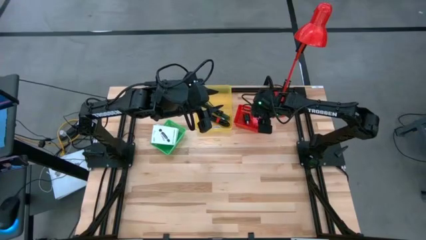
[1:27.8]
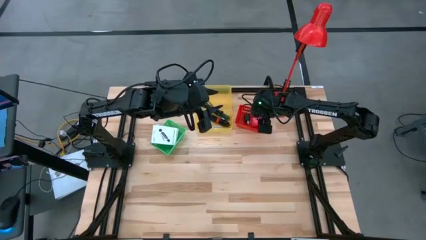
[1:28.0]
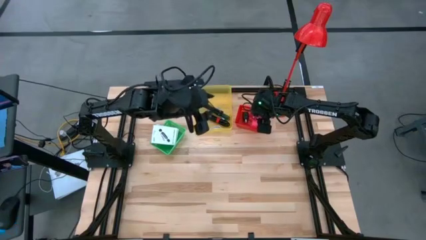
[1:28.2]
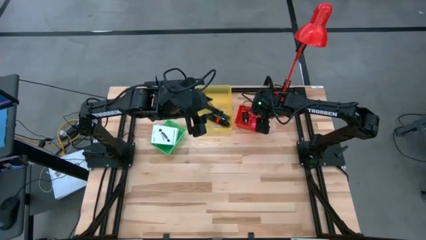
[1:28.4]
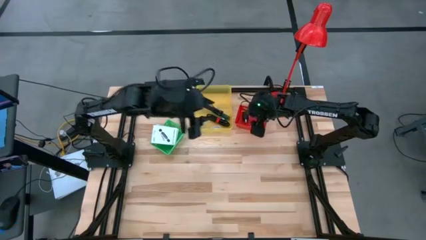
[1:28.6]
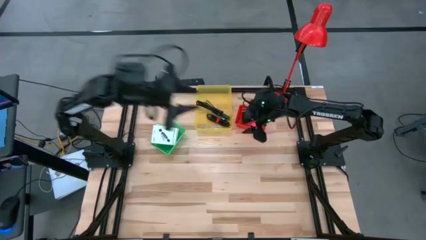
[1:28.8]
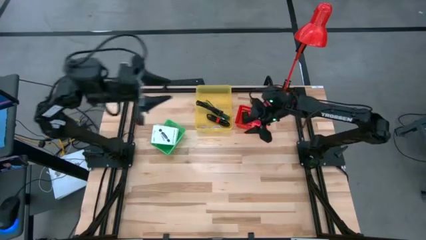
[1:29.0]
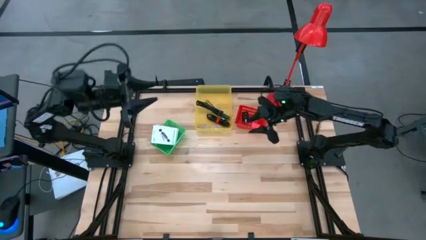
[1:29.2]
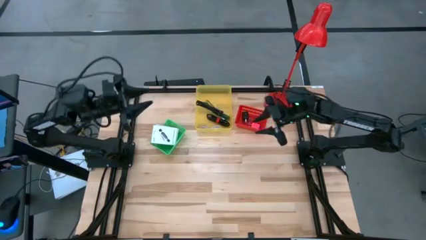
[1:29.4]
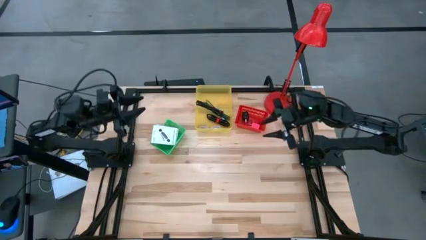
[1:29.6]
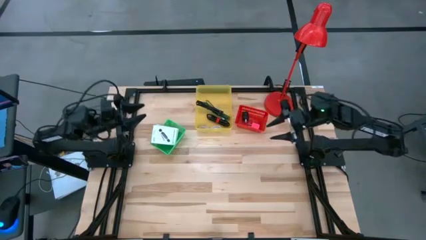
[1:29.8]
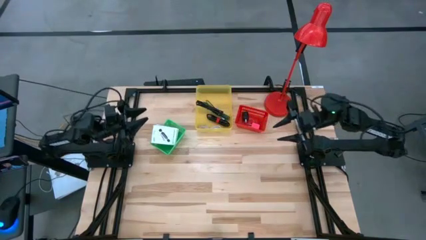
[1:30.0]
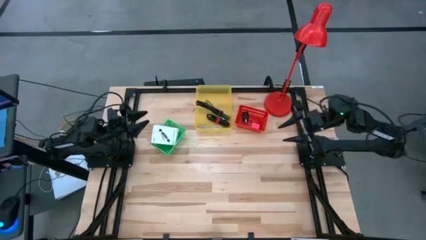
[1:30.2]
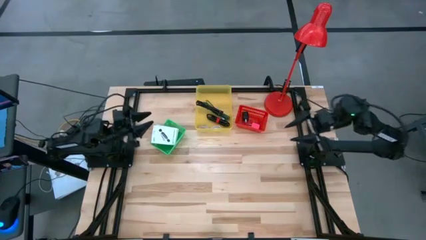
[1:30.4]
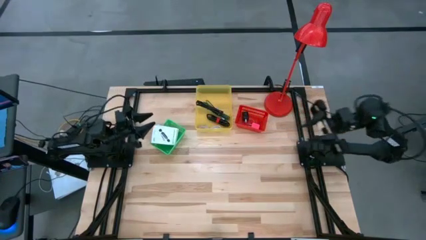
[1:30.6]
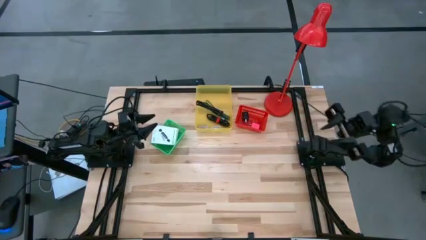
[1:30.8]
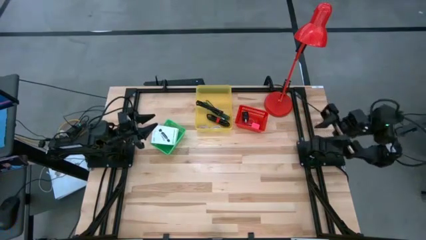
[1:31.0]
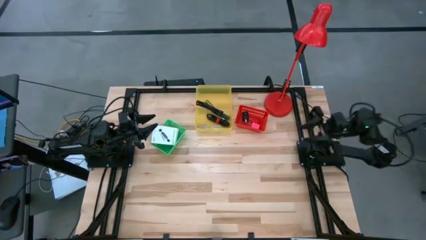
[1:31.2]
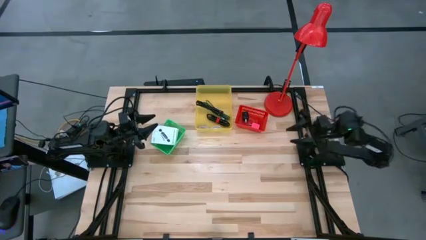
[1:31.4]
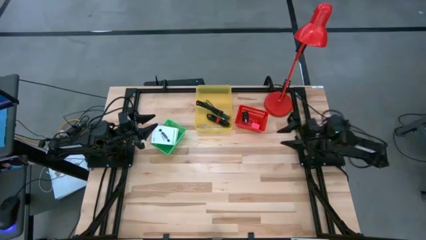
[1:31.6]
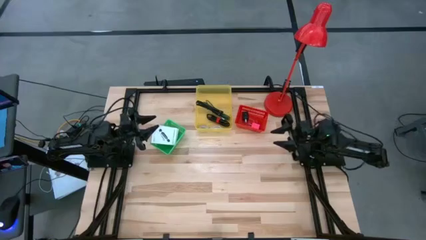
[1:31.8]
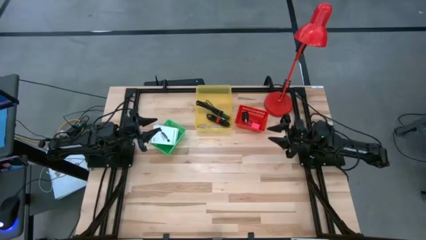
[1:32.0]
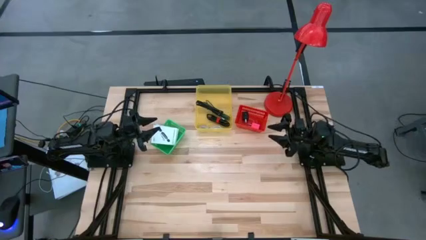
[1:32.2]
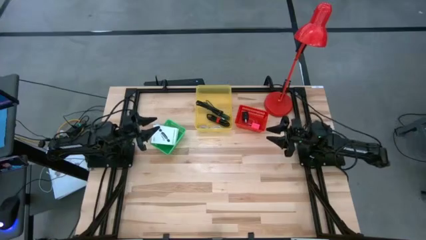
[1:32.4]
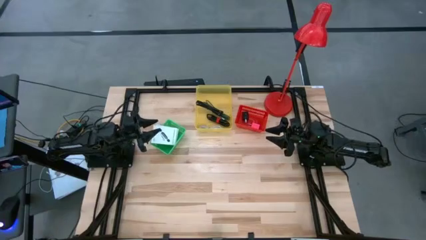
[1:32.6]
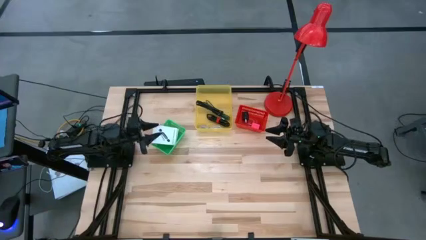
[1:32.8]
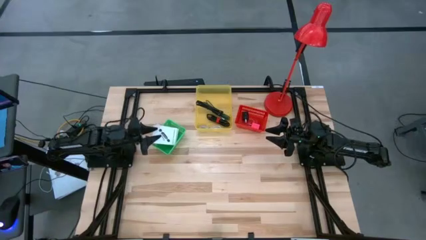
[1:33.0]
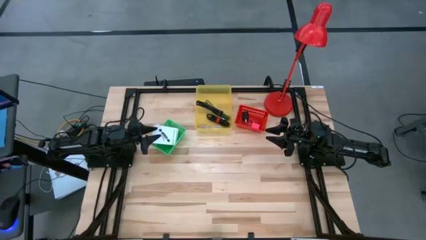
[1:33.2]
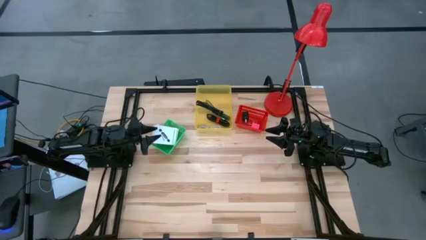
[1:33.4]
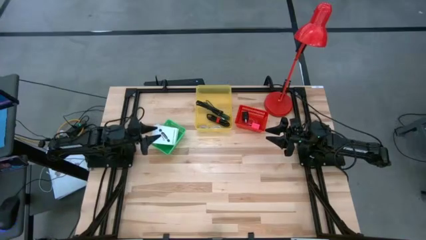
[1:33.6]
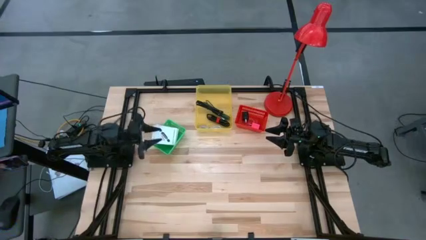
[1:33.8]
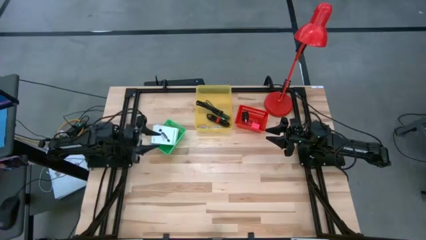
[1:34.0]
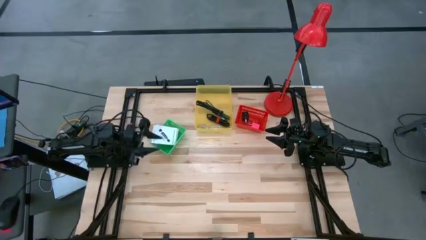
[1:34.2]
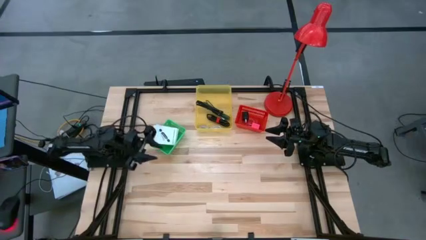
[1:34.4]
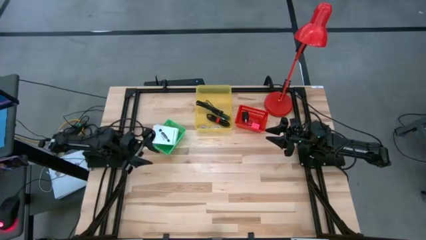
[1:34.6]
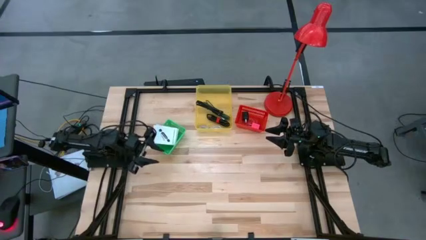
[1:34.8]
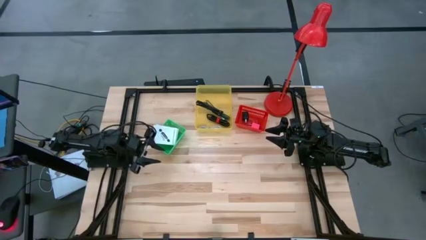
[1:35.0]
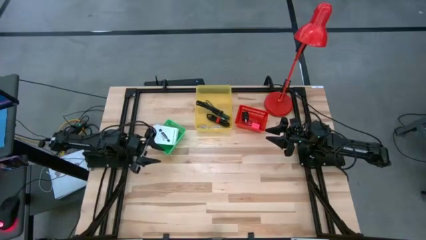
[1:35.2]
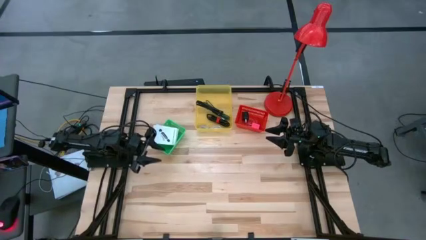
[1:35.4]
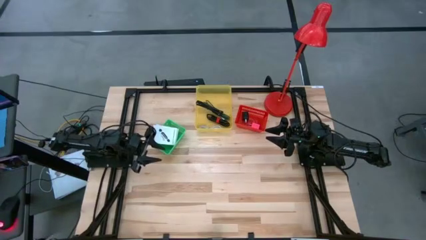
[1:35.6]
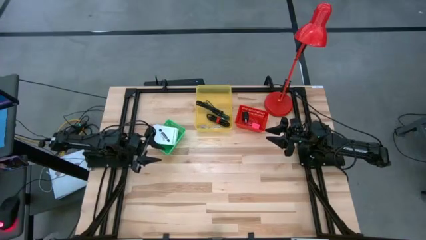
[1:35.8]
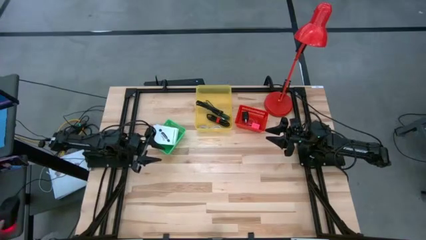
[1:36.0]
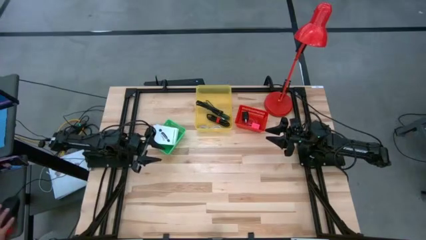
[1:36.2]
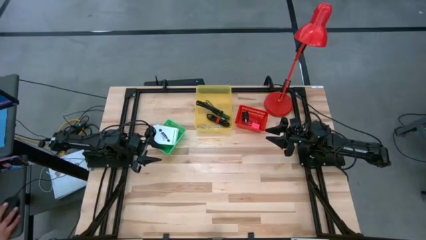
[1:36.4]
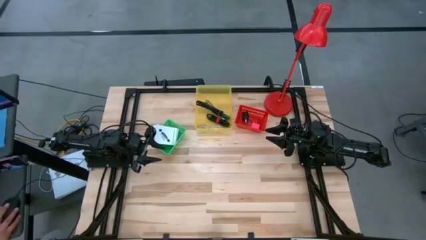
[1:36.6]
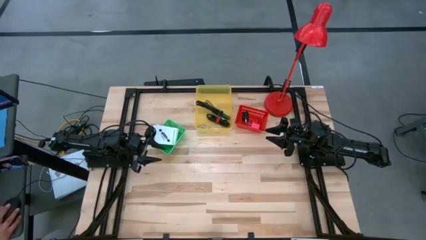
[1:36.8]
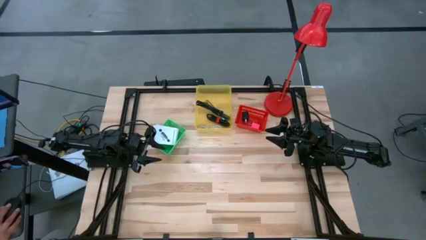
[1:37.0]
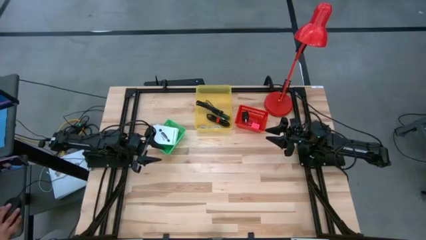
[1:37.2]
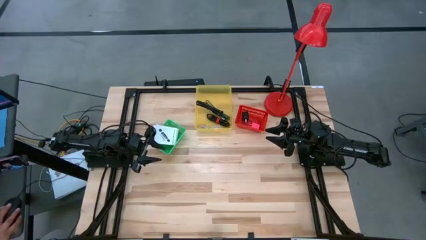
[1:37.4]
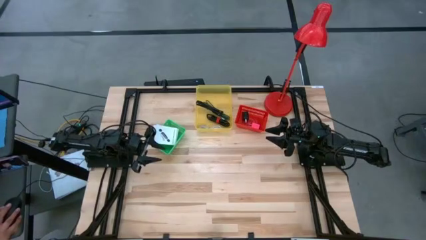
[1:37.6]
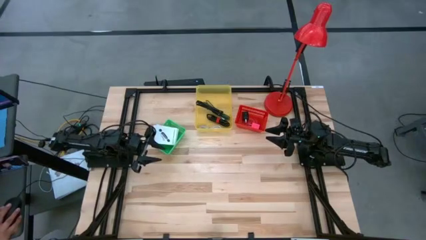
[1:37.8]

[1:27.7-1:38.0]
Task: Pick and place items into bin
Return to Home Position

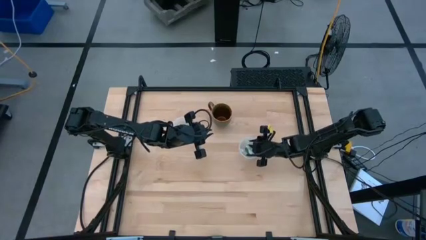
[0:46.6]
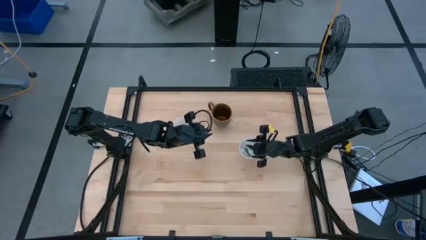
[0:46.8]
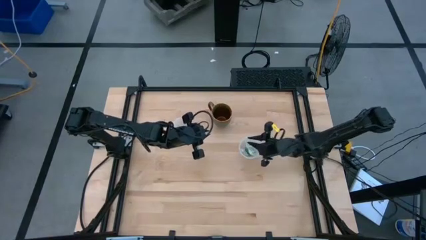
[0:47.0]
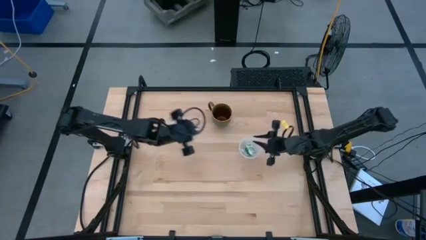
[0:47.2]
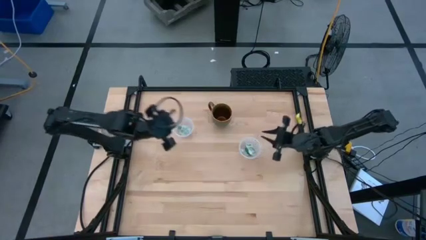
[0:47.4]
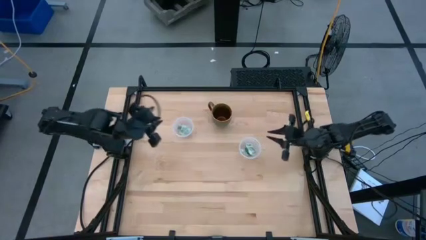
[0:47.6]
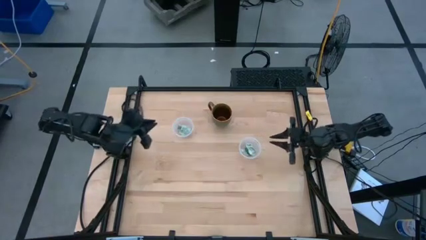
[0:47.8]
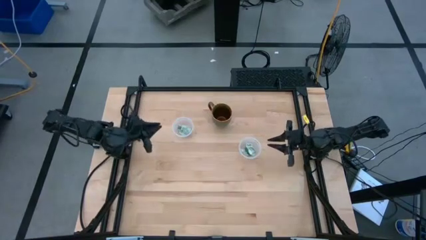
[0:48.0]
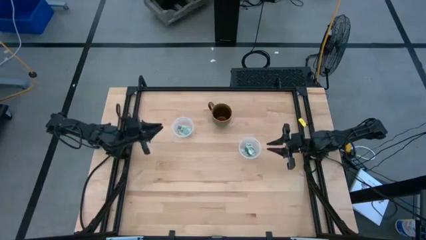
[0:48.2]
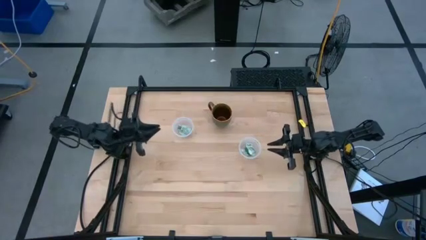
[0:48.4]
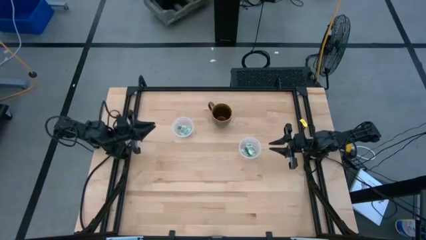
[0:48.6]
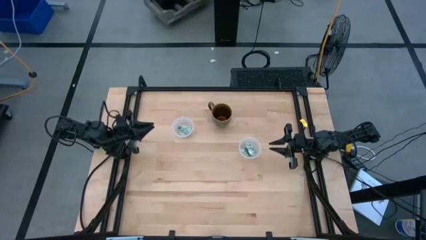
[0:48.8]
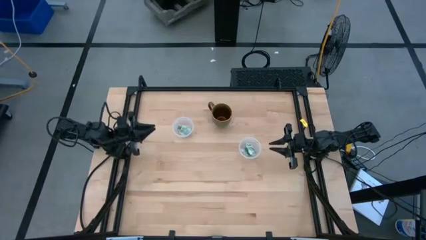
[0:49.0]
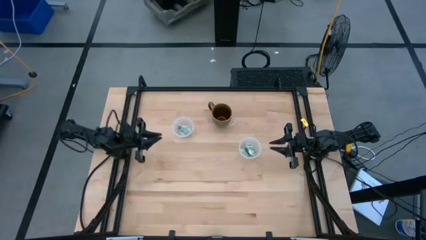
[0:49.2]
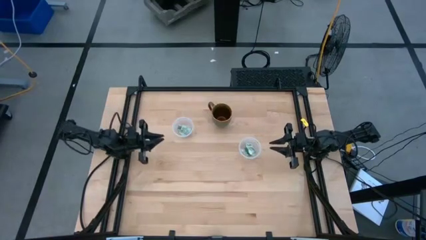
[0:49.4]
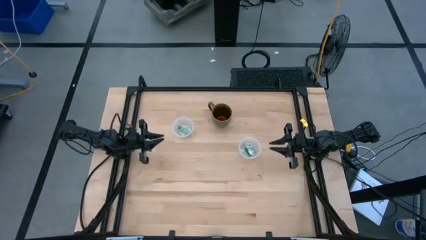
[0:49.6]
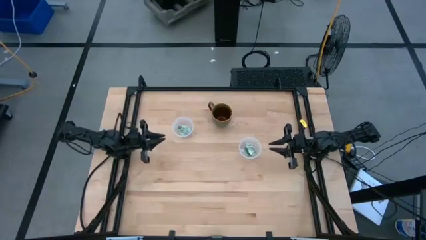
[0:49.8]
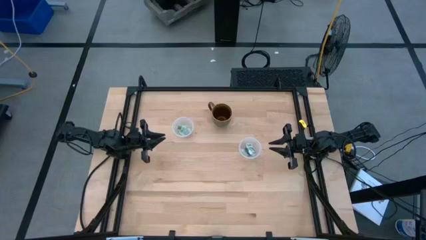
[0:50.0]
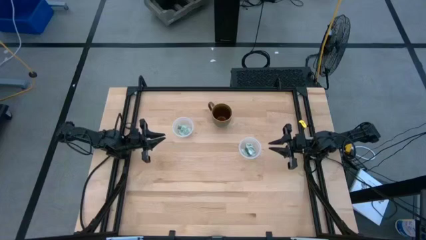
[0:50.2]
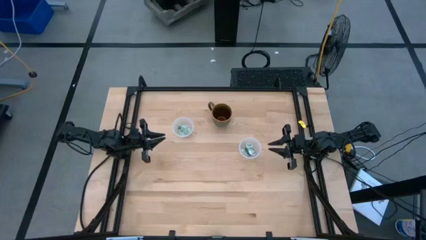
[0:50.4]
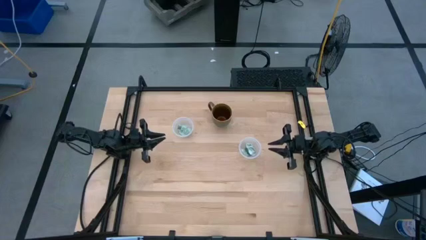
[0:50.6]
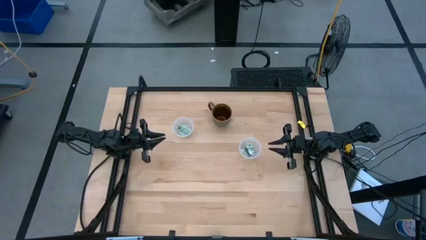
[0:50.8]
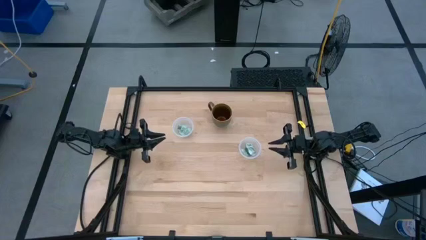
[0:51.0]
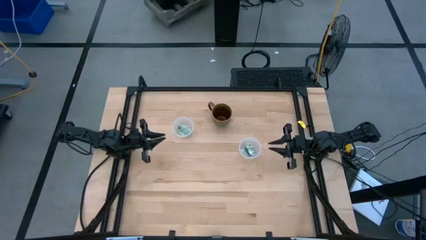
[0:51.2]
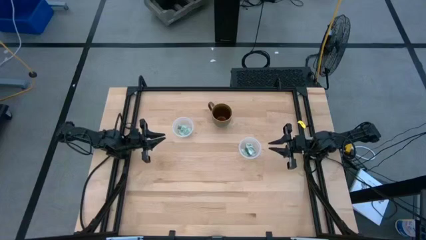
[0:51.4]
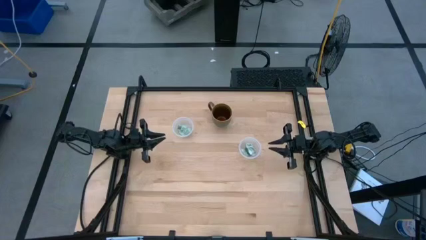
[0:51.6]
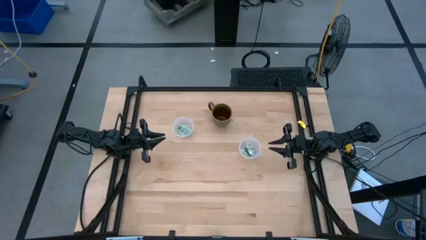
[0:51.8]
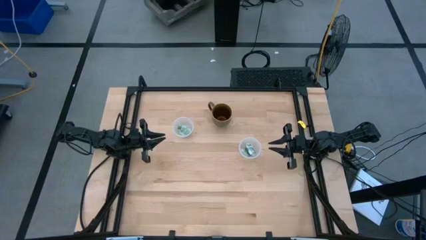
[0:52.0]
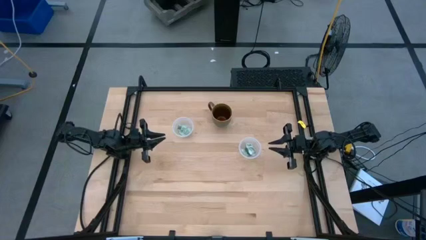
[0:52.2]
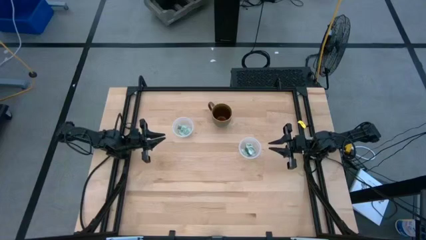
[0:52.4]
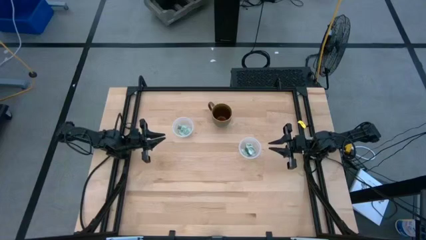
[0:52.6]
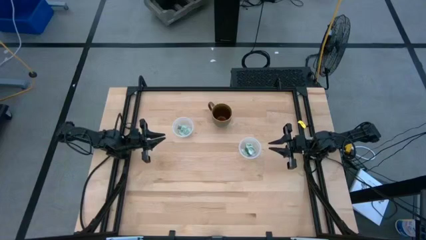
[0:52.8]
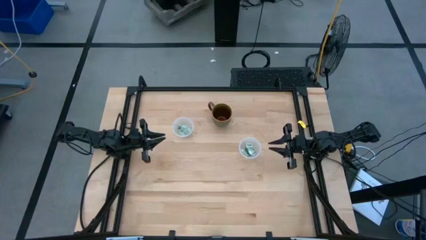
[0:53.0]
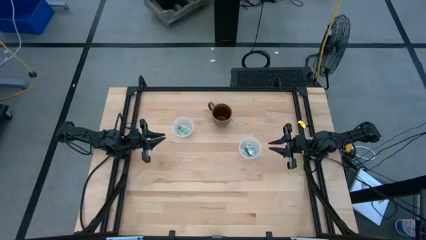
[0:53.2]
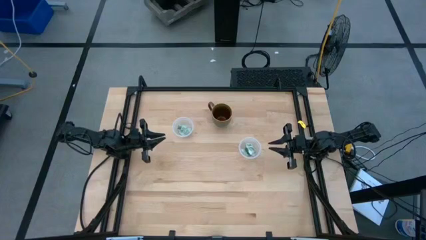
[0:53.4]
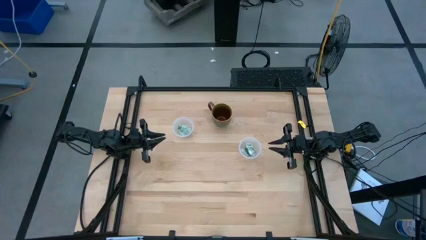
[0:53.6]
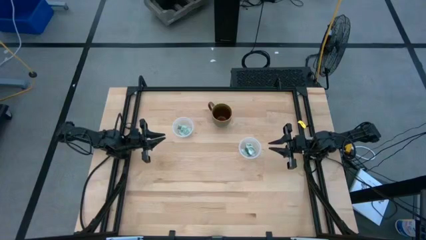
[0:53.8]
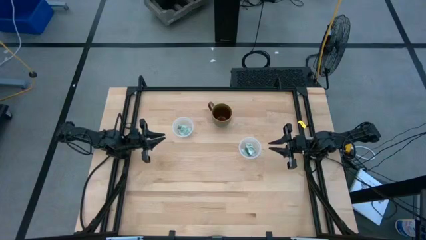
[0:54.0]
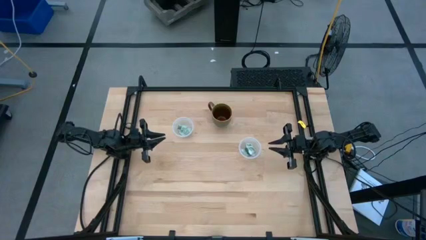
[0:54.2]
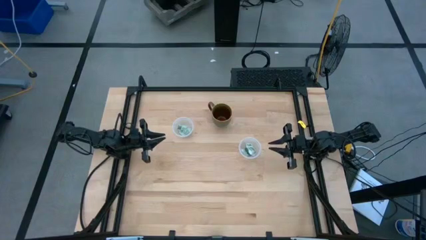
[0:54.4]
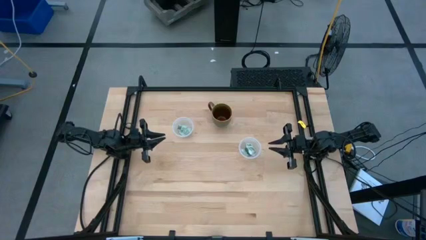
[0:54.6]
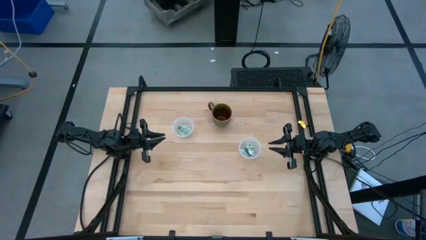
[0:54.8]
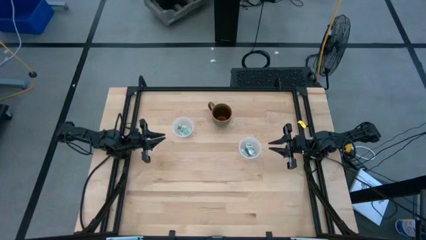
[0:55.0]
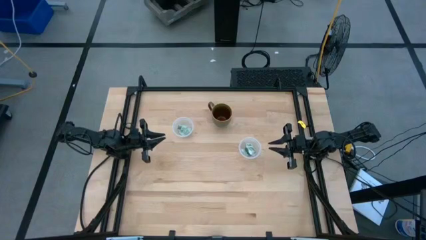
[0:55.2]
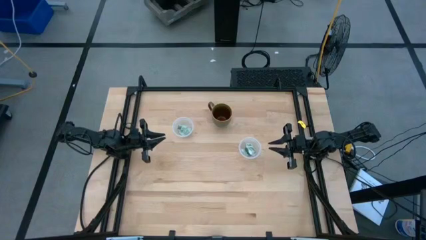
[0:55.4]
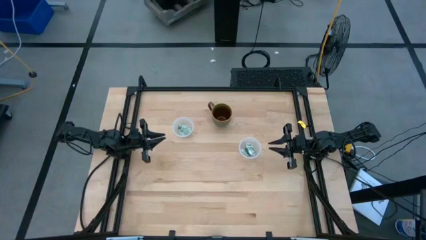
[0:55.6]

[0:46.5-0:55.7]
Task: Pick and place Stevia / Truvia into bins
Return to Home Position
